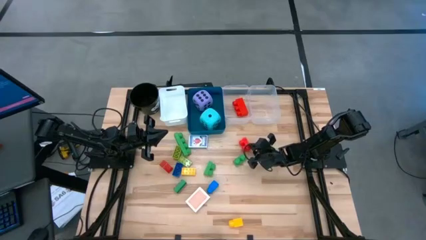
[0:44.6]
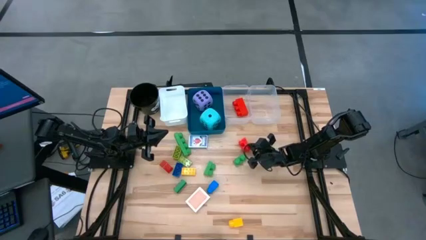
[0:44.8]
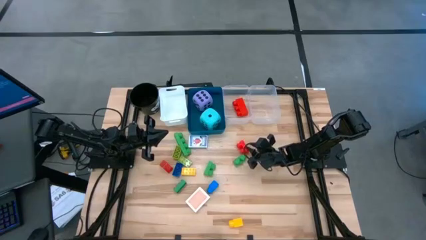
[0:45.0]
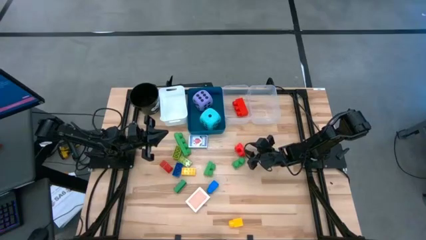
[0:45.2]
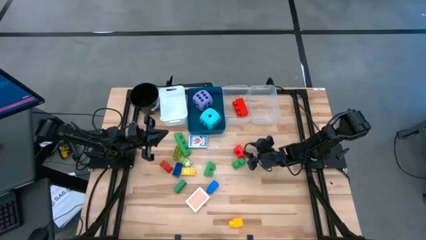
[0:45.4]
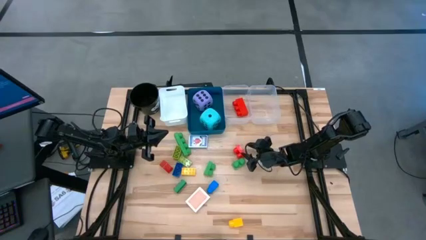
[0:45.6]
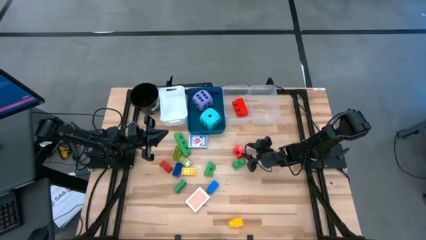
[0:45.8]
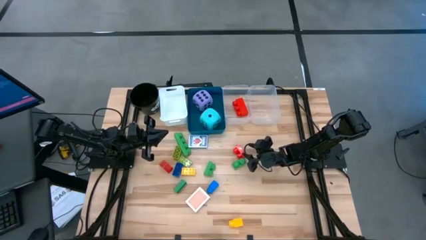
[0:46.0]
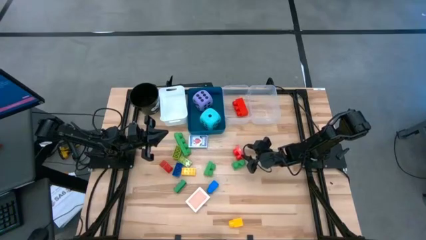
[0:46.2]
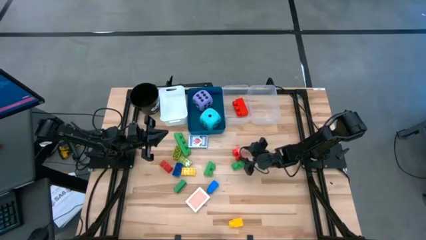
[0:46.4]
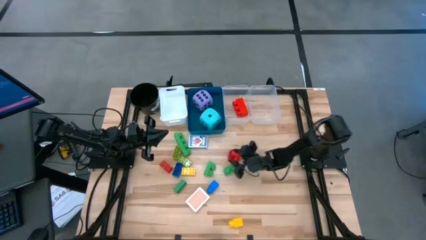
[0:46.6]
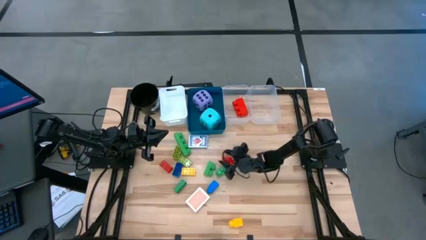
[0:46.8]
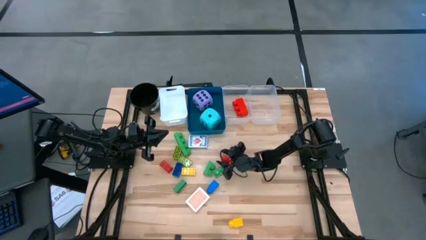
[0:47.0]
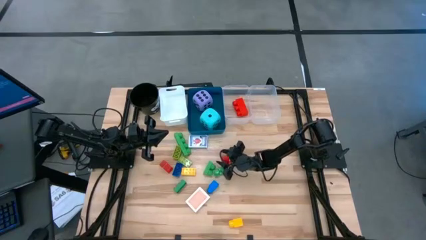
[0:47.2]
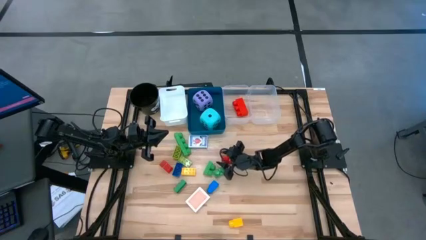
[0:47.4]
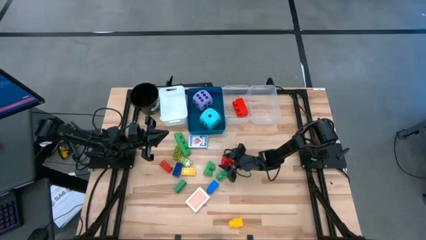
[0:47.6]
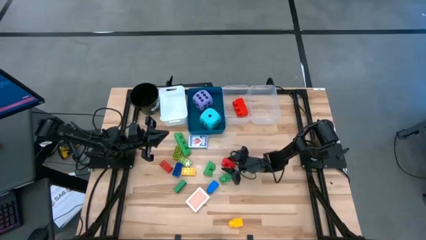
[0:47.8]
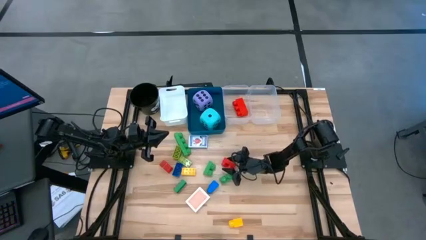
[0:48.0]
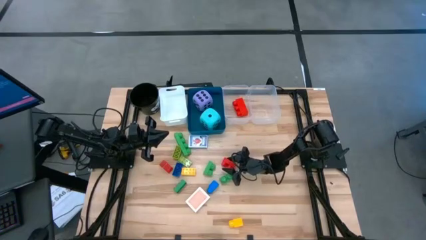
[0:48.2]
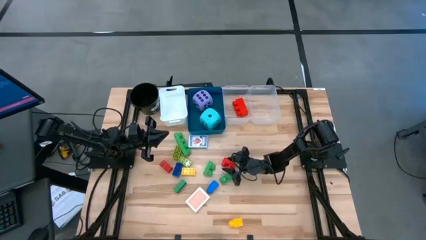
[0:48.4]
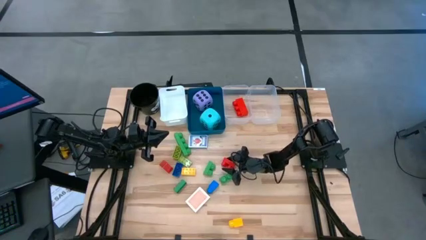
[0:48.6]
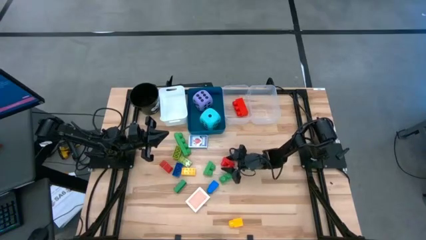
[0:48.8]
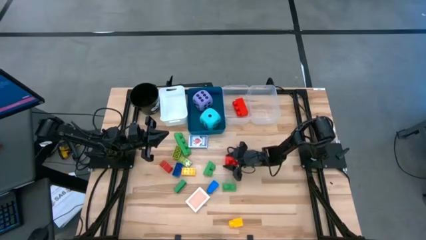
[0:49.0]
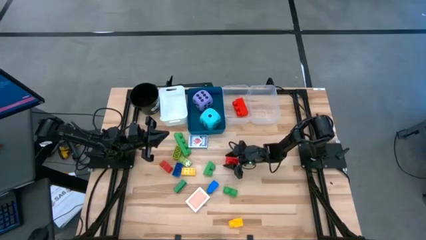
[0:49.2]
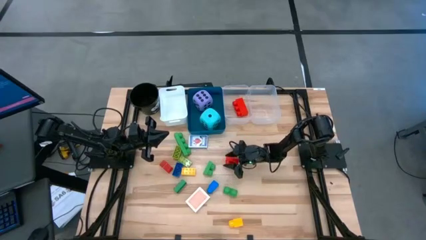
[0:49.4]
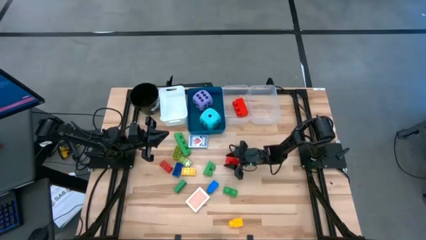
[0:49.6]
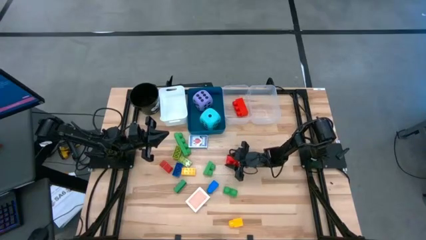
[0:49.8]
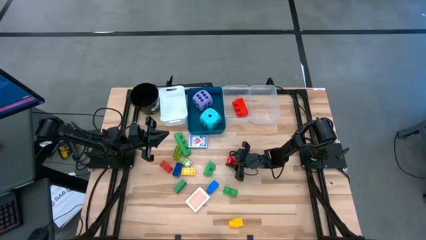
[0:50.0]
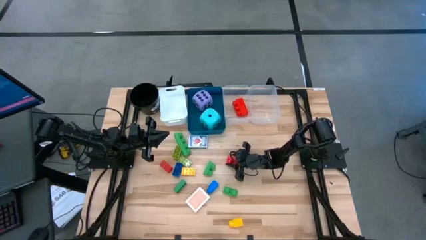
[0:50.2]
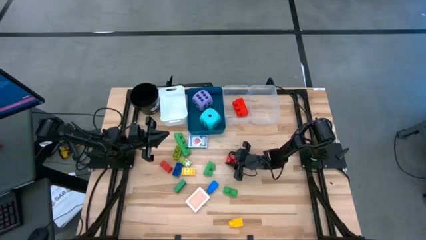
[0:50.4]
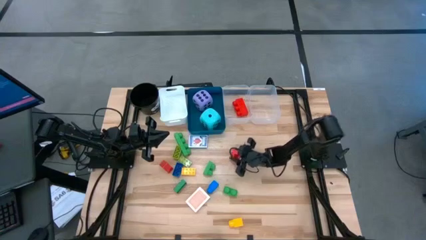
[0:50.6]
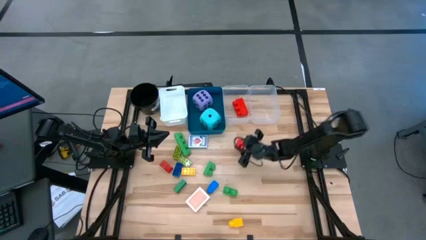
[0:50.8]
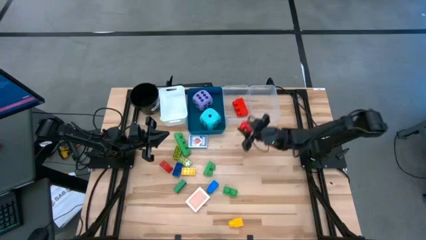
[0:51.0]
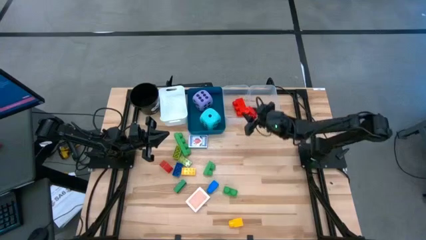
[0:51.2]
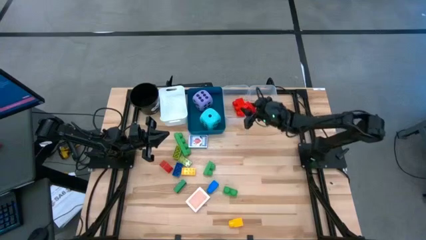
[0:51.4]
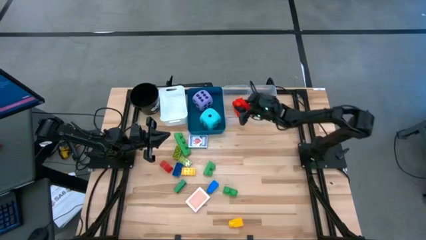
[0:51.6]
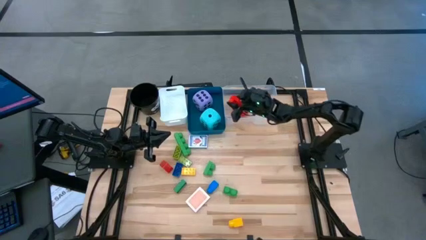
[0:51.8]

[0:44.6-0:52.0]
Task: Pick & Place Toys
Put the red 2 stud game piece into the left transparent bin

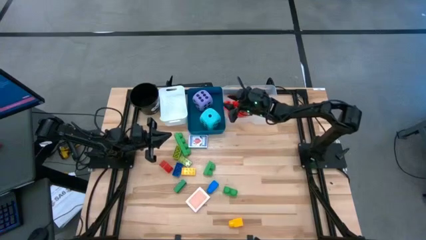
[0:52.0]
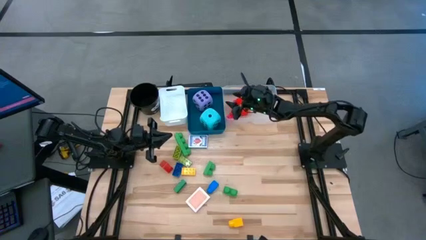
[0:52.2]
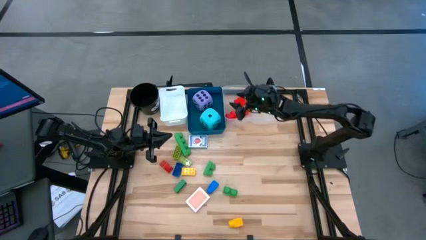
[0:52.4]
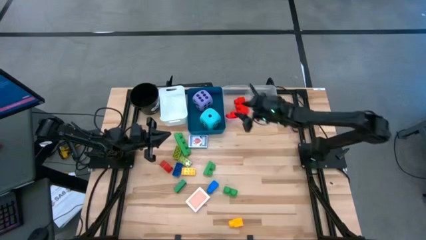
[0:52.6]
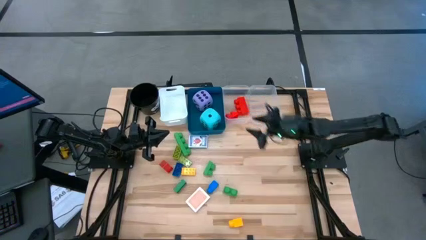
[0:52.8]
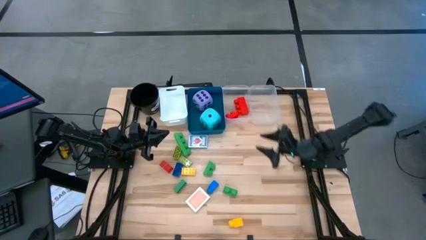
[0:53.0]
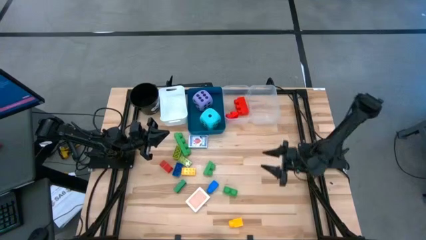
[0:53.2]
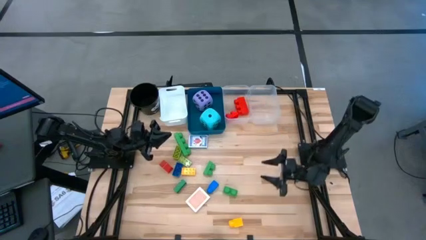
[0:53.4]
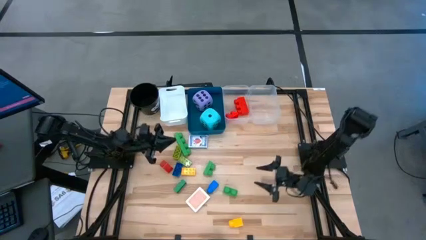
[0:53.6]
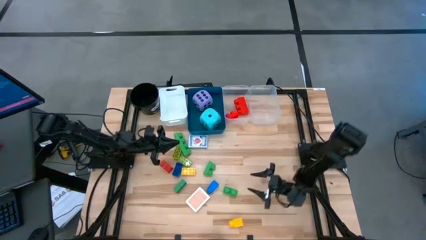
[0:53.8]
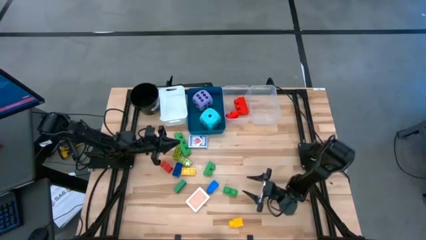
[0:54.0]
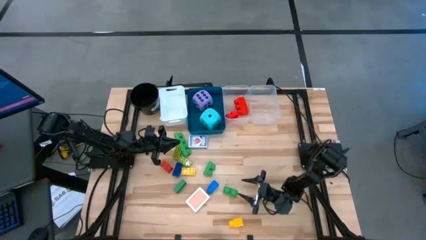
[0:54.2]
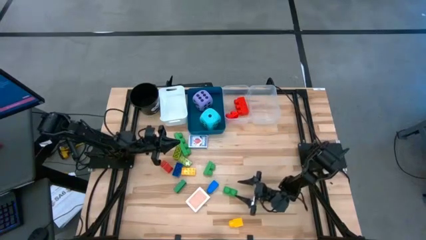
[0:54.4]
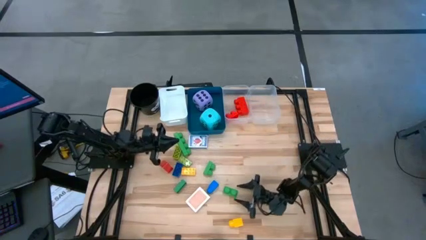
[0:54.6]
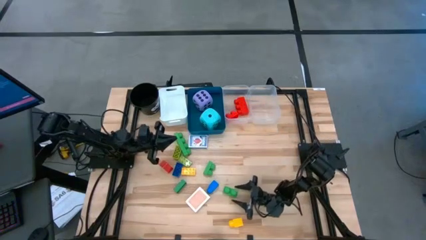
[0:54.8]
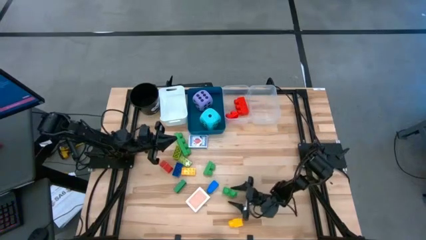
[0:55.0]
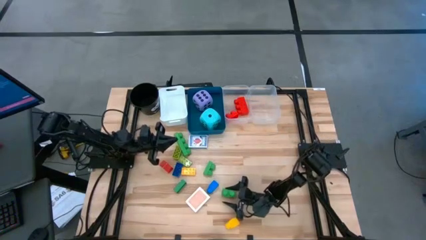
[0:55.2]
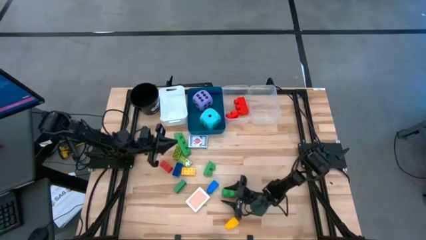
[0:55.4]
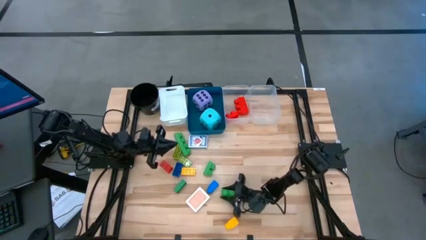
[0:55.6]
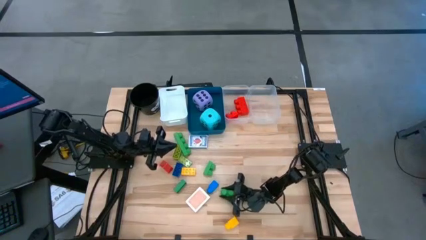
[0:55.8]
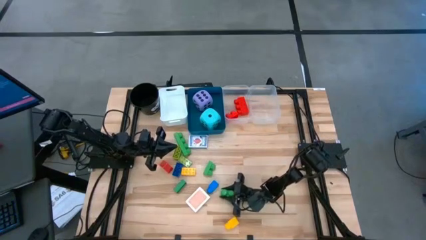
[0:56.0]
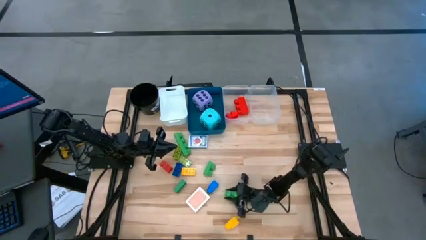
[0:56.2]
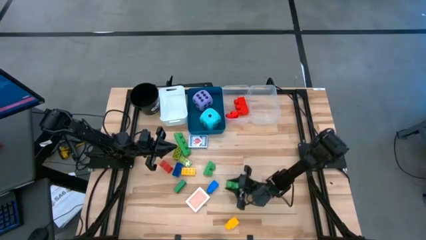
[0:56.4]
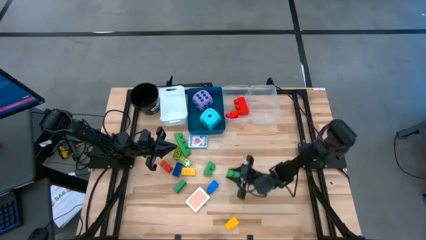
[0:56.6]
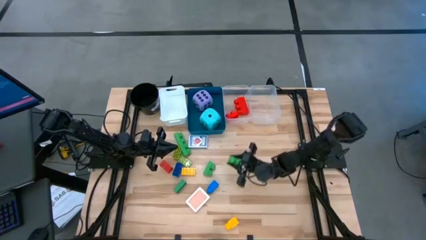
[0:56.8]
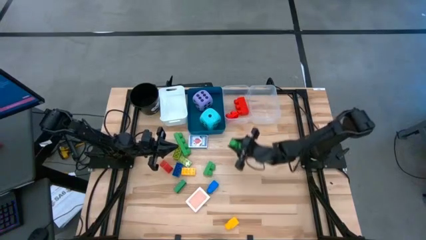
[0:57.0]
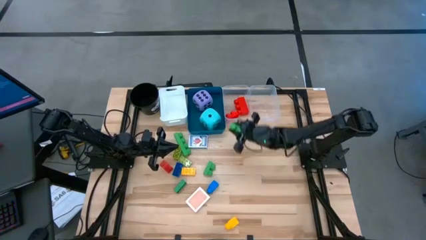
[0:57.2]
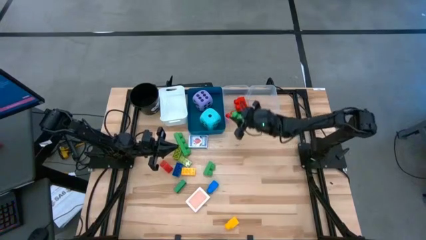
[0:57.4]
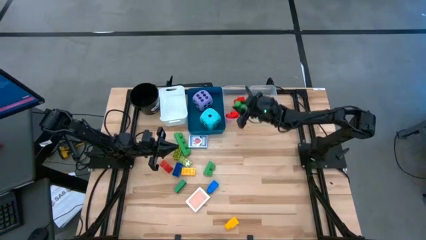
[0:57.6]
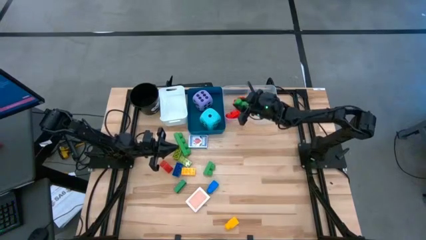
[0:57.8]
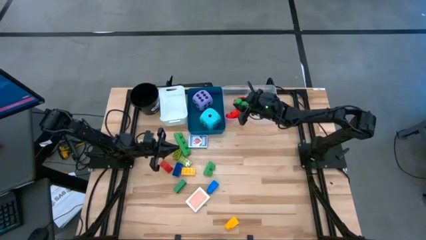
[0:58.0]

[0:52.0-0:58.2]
Put the green 2 stud game piece into the left transparent bin

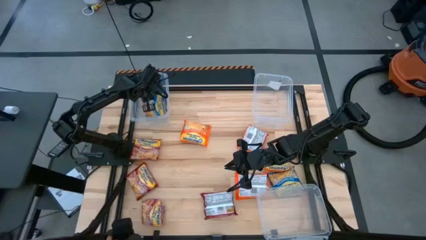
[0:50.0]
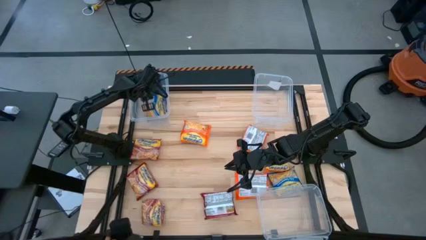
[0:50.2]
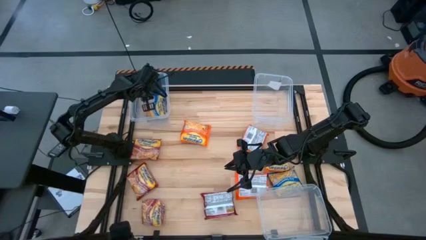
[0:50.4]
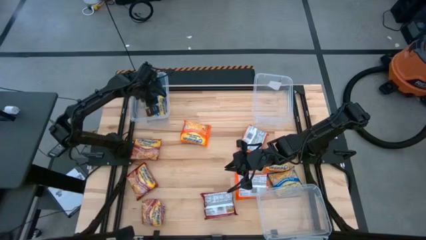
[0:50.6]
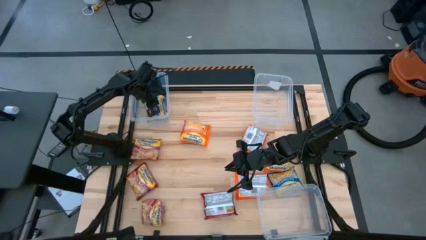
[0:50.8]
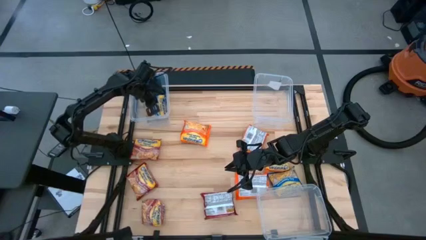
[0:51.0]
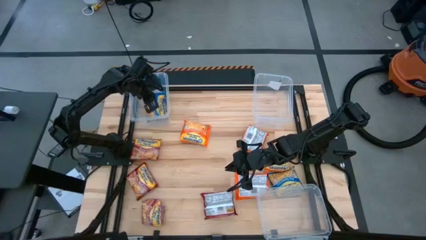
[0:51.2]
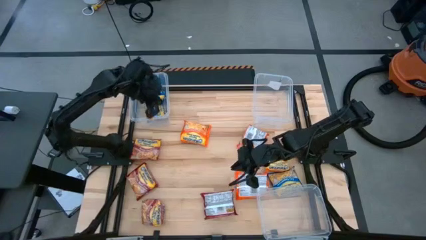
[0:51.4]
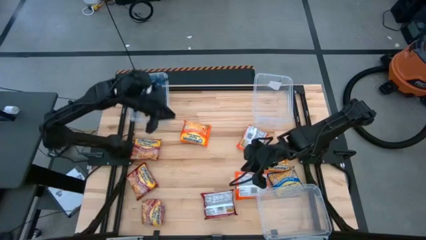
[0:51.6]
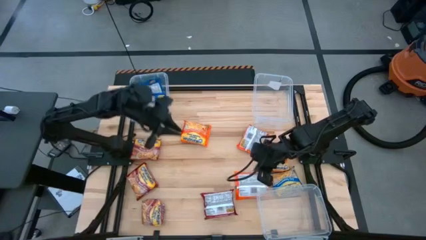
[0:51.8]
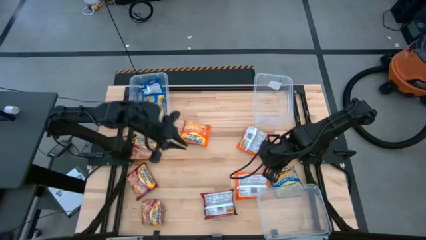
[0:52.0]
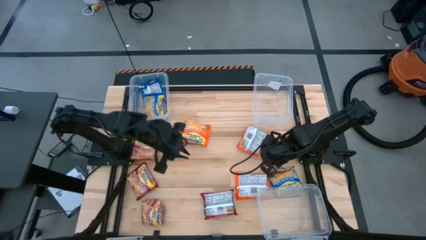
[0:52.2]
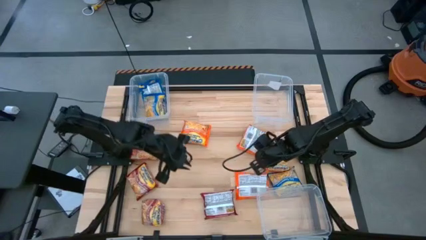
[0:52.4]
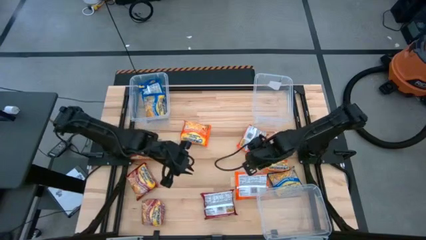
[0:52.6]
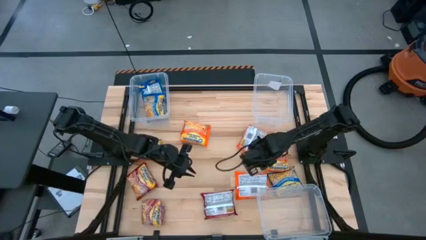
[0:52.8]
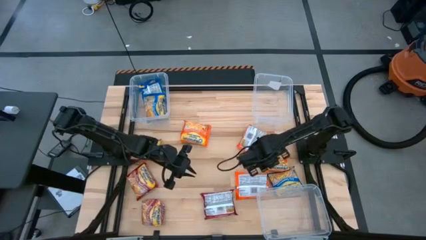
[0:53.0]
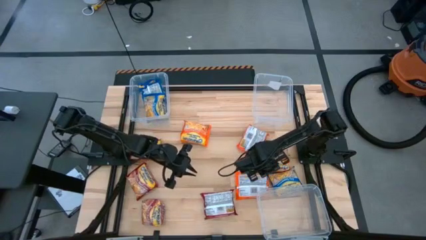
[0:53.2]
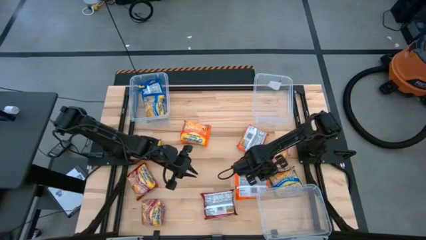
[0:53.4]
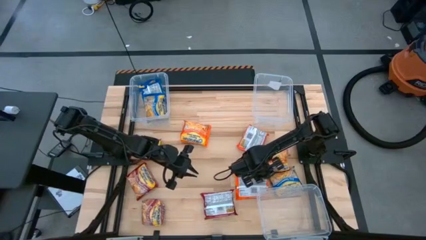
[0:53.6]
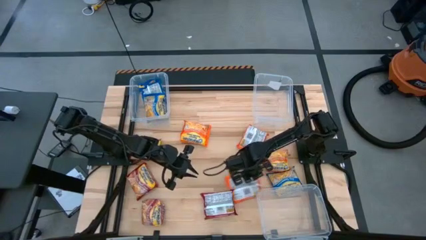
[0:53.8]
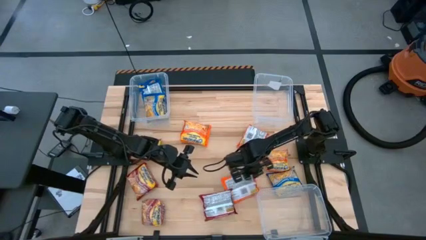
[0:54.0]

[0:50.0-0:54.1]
Task: Sort Maruchan noodles
Move the orange noodle pack to the center of the table
